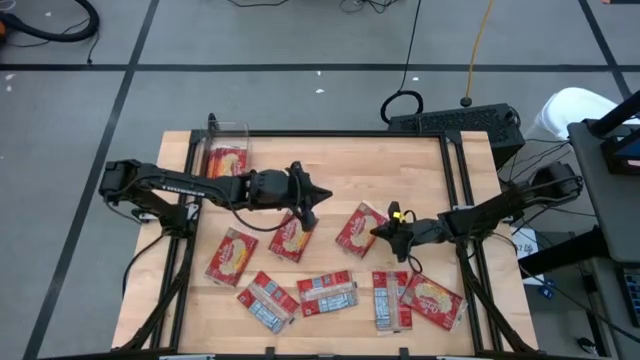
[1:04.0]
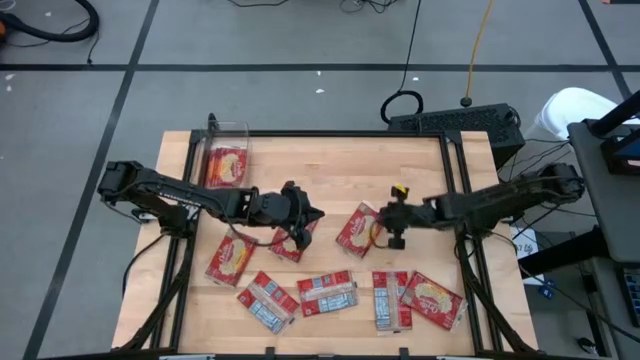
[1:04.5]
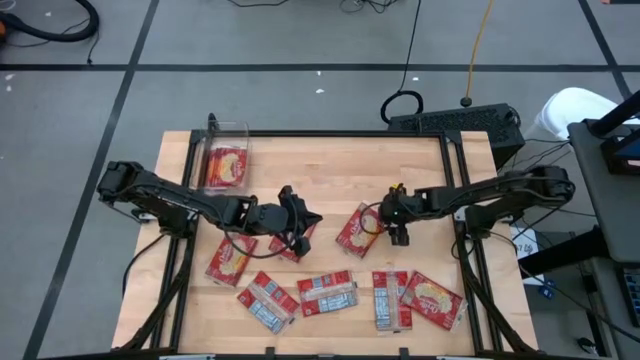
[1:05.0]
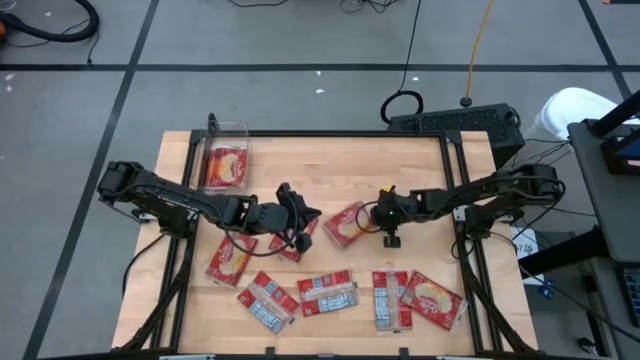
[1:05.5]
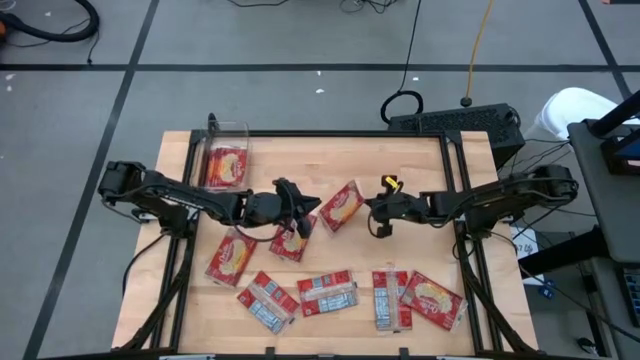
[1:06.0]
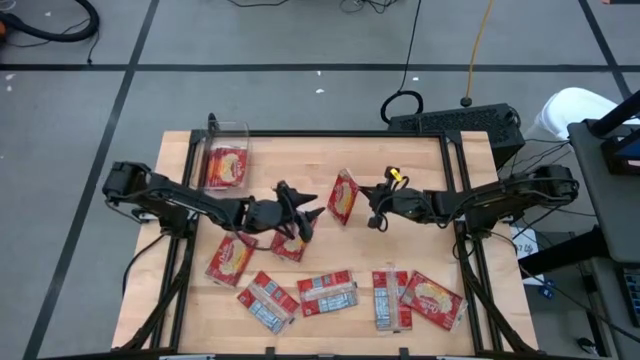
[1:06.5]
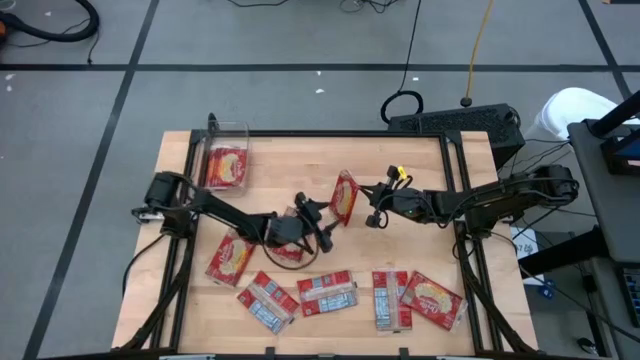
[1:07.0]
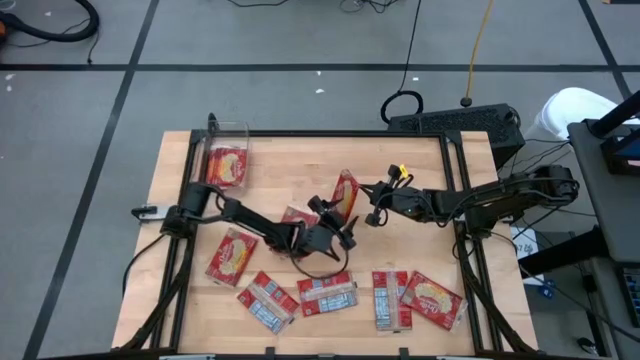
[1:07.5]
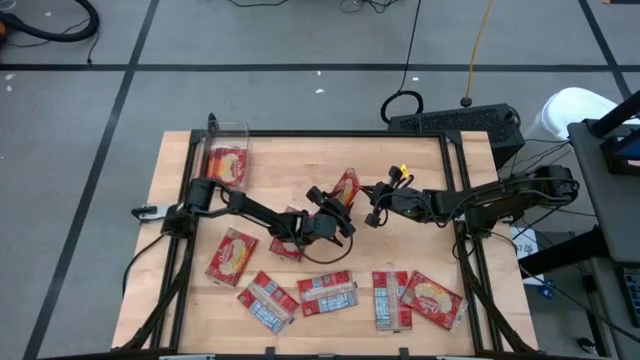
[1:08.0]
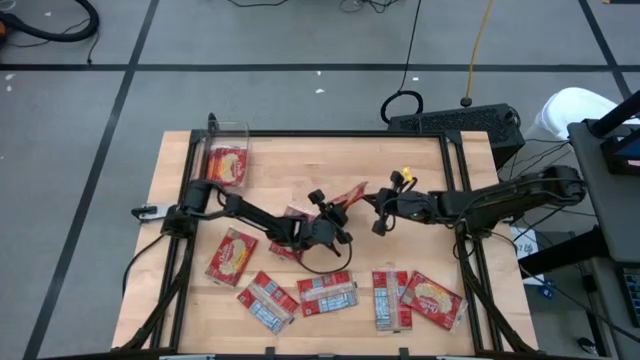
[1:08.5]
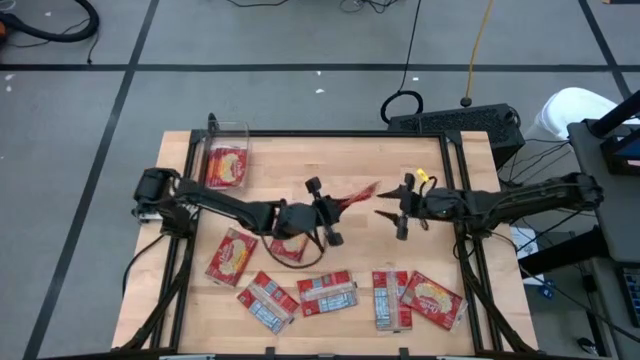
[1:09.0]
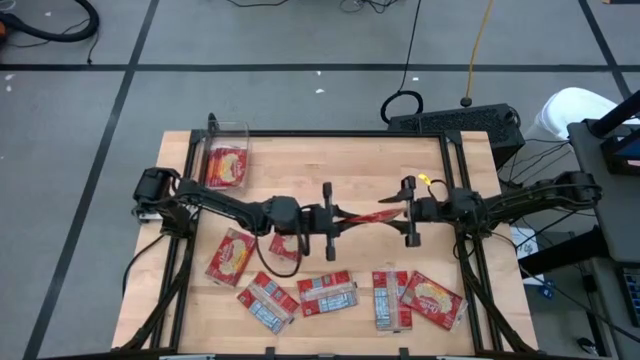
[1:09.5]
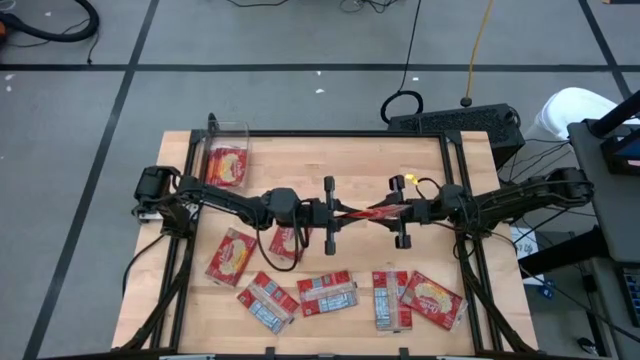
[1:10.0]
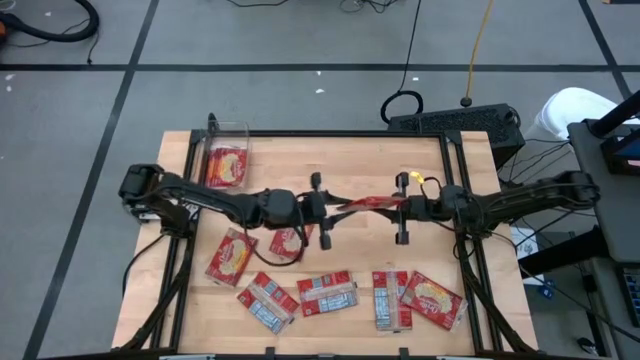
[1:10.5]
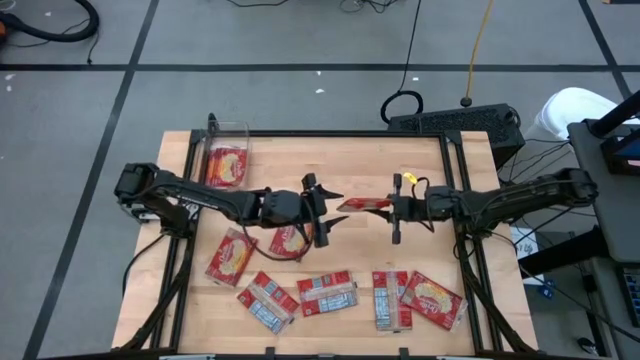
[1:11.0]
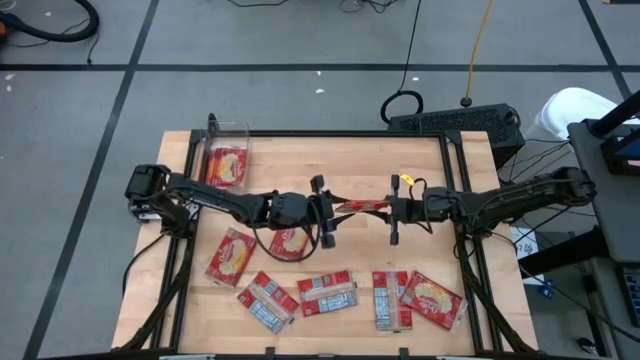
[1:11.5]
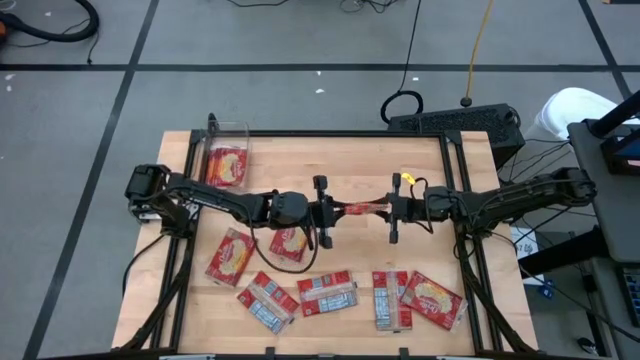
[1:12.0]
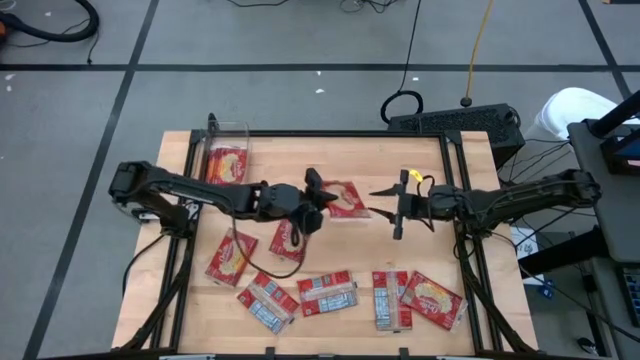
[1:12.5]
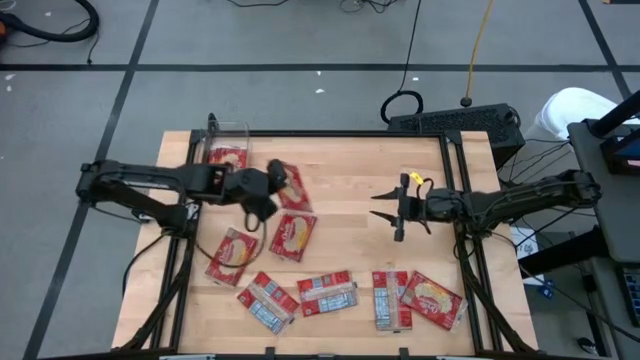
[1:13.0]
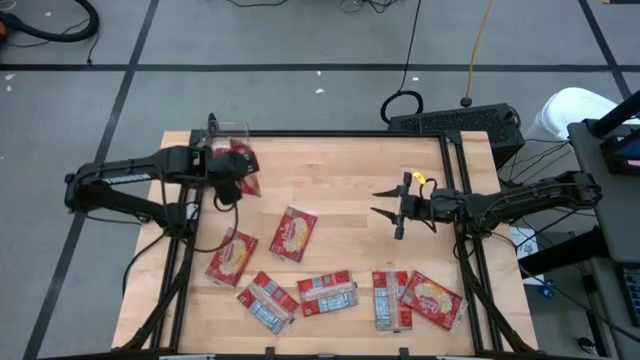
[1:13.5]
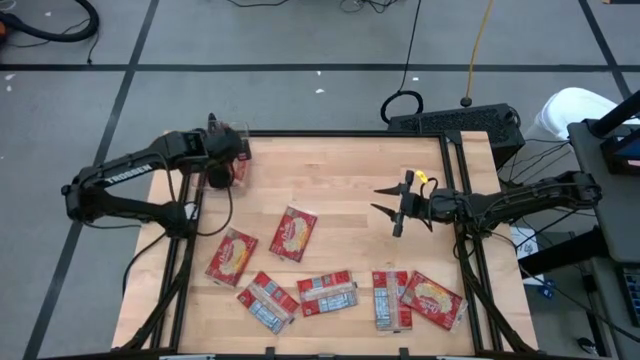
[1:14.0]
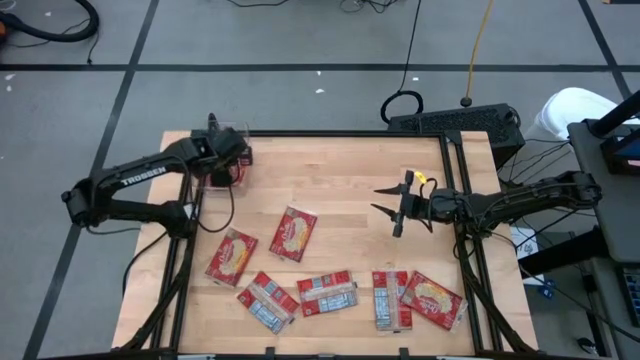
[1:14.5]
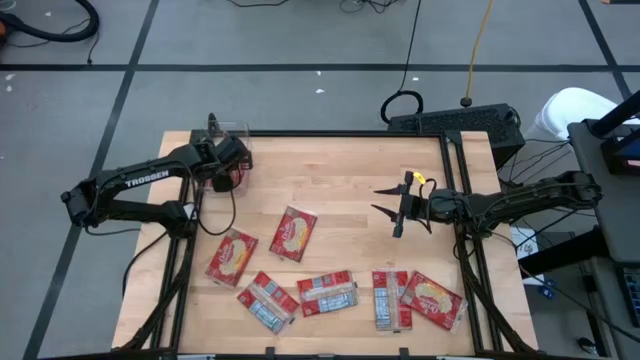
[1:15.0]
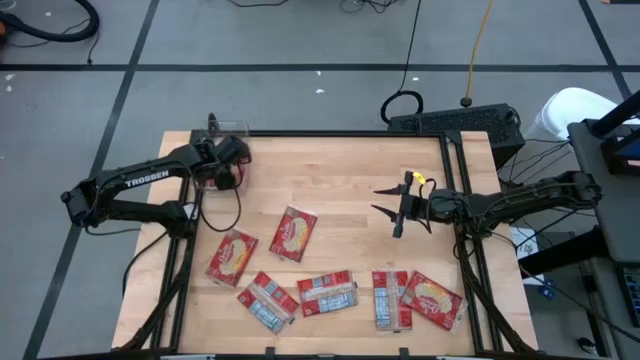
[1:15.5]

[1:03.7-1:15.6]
Task: Sort popcorn bags into baskets
Put the red popcorn bag into the transparent bin

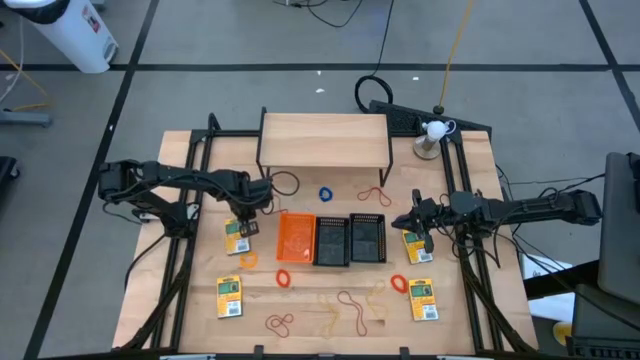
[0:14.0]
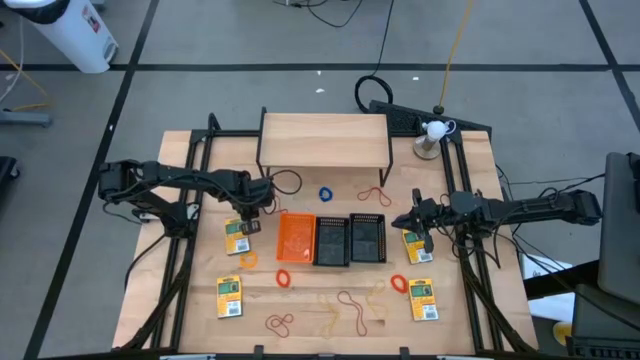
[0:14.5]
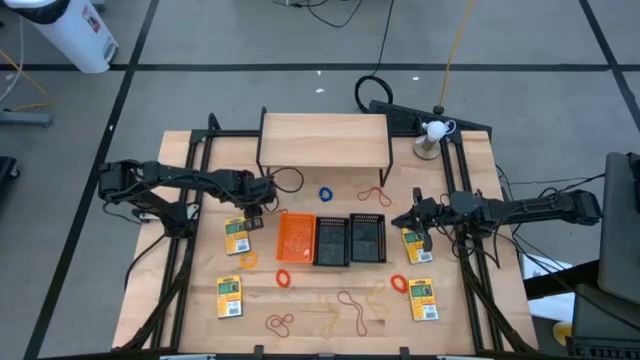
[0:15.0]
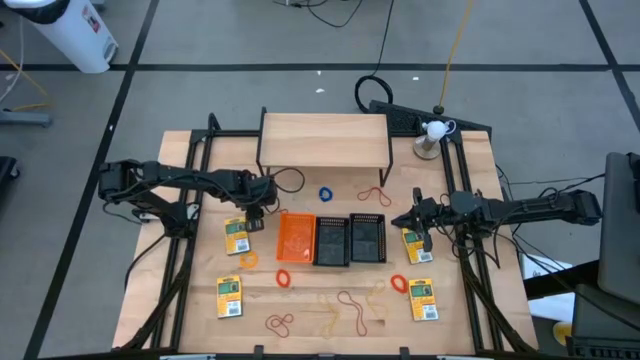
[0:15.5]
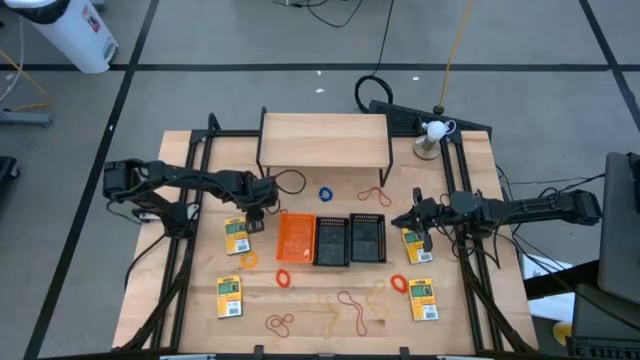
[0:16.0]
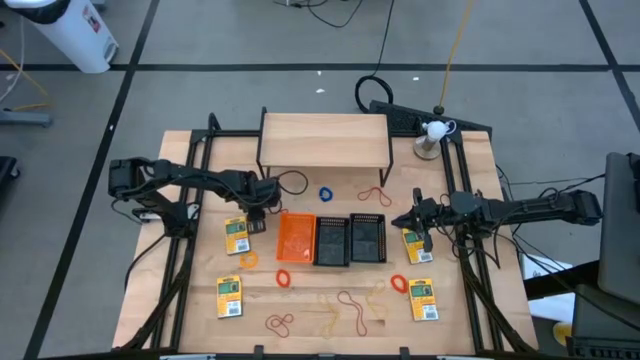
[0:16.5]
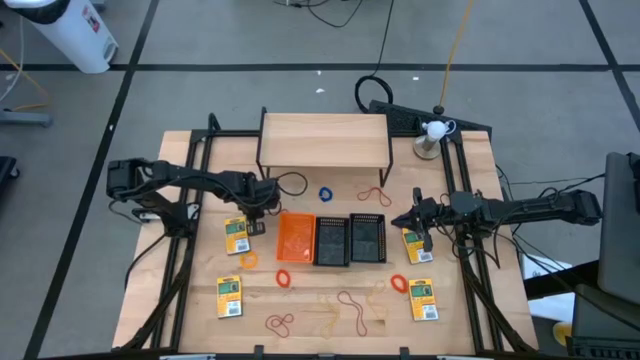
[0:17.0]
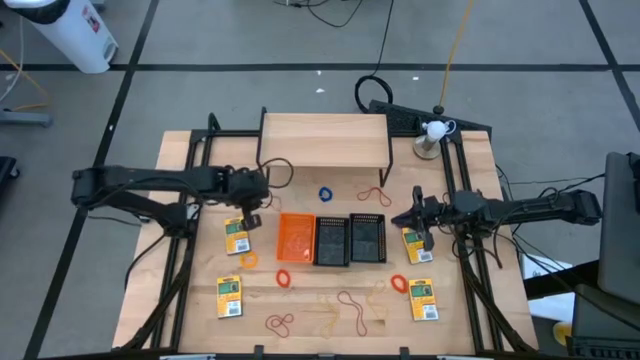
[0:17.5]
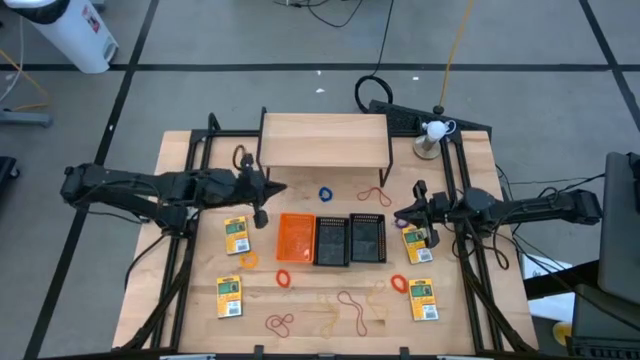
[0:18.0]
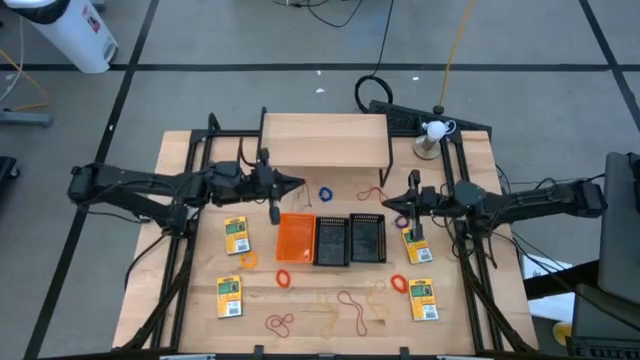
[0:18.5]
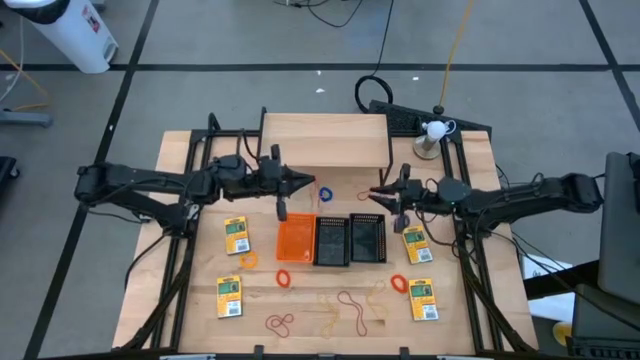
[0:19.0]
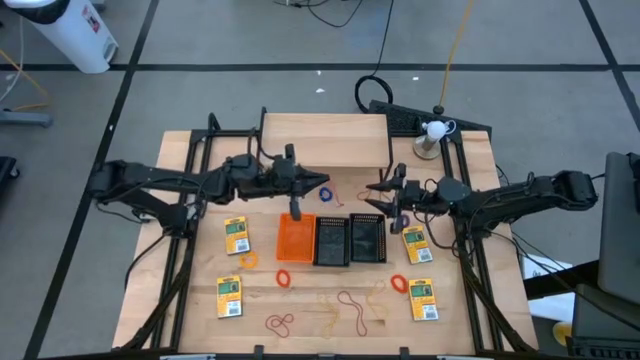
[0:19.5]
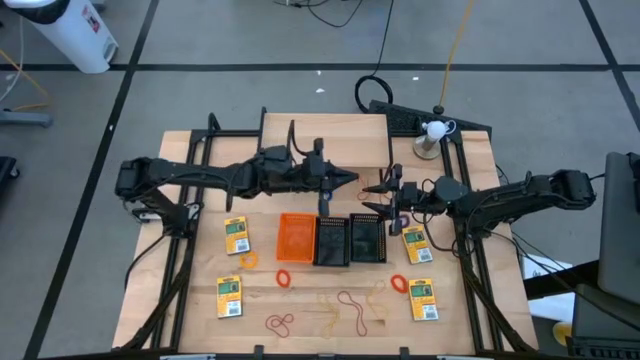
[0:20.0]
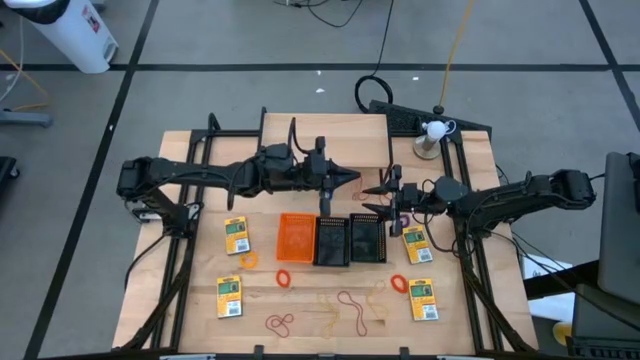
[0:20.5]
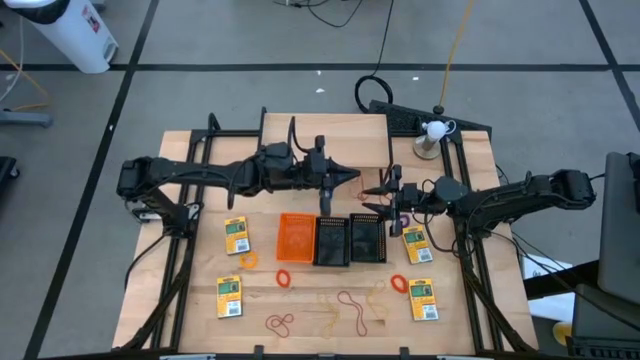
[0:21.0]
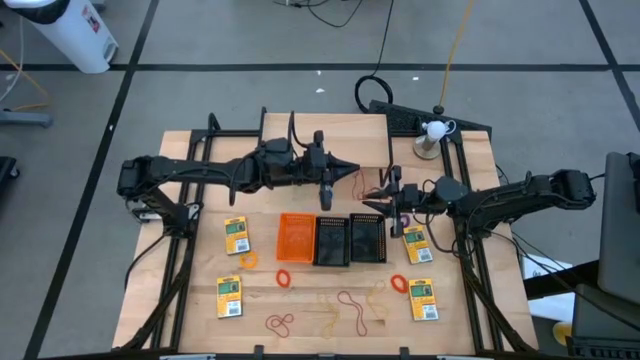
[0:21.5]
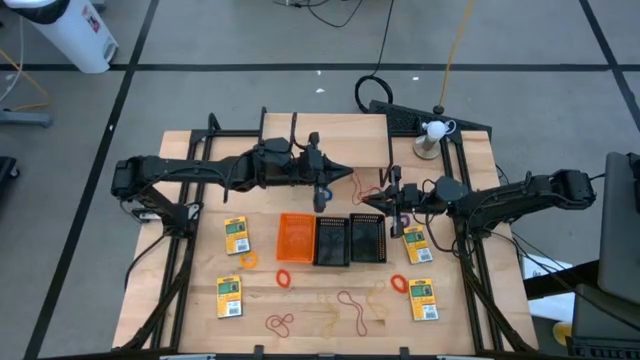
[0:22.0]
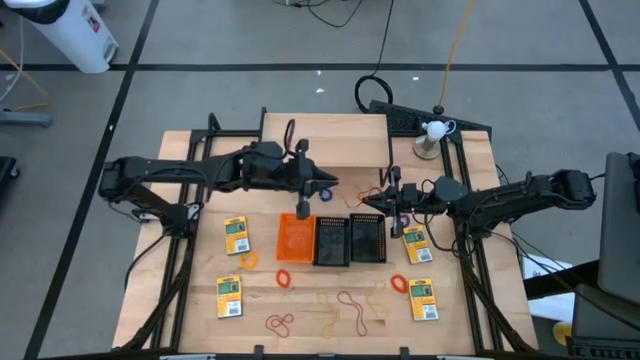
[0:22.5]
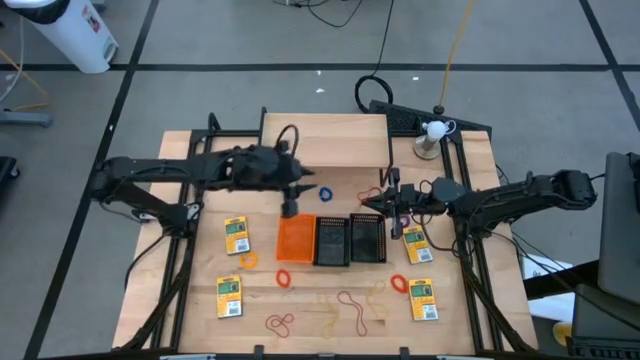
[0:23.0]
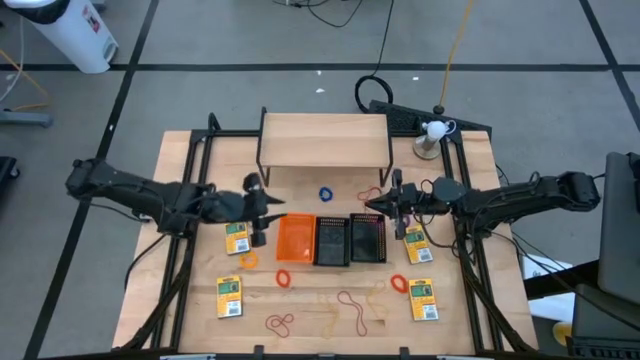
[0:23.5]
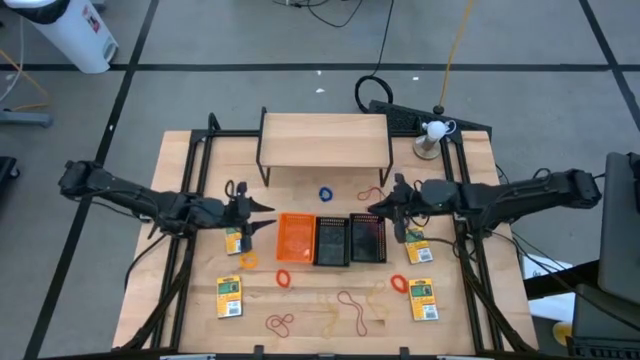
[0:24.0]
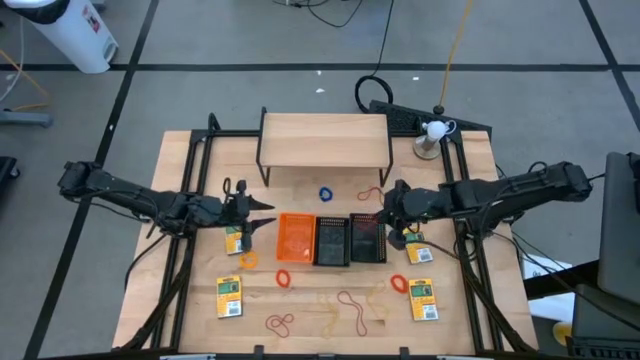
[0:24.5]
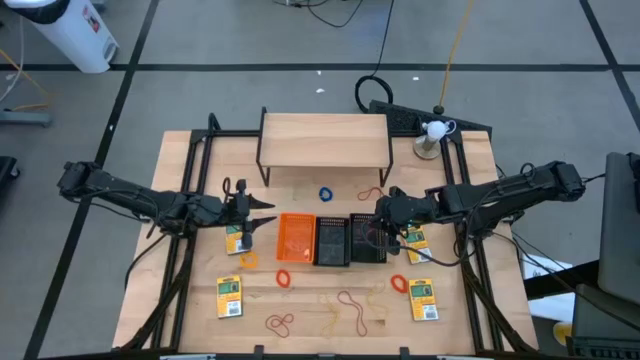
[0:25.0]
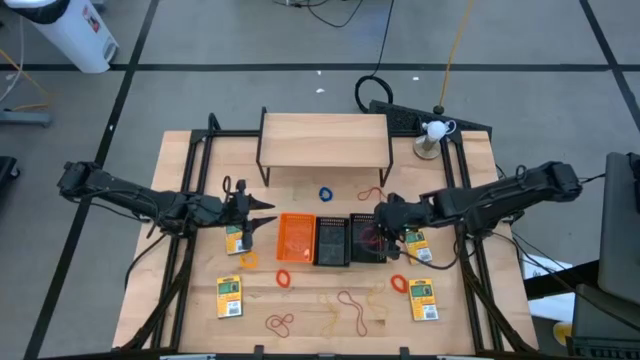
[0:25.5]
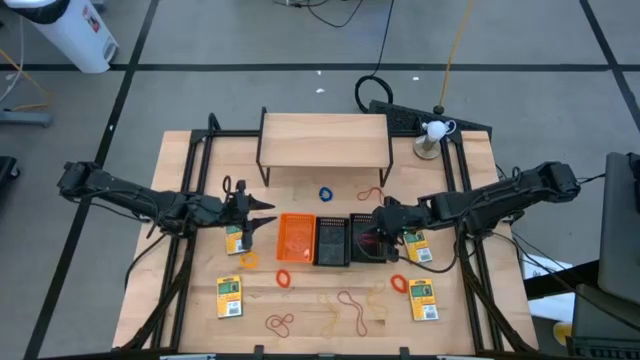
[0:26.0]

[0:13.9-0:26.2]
Task: Pick & Place Office Desk Supplies
Put the red rubber band into the right black bin
